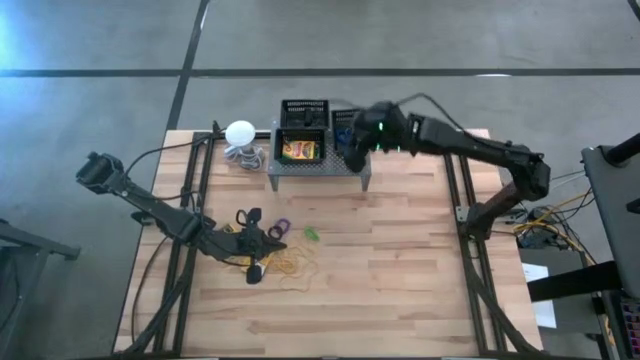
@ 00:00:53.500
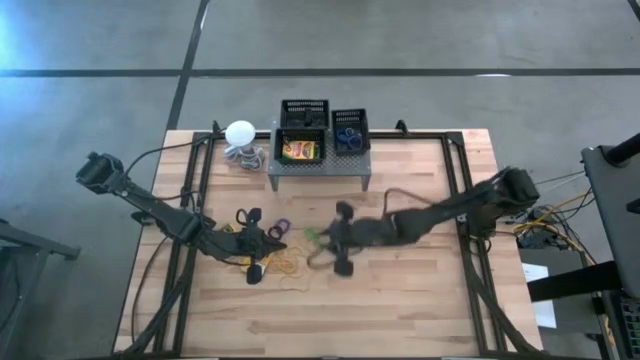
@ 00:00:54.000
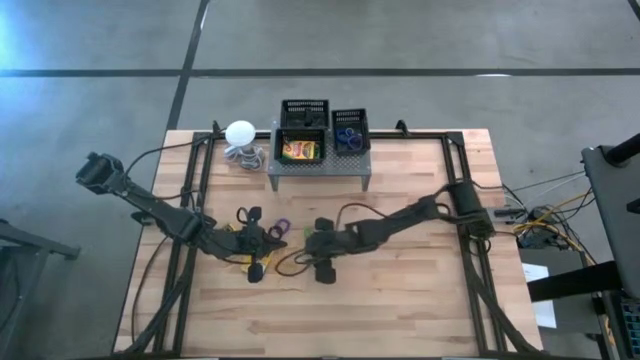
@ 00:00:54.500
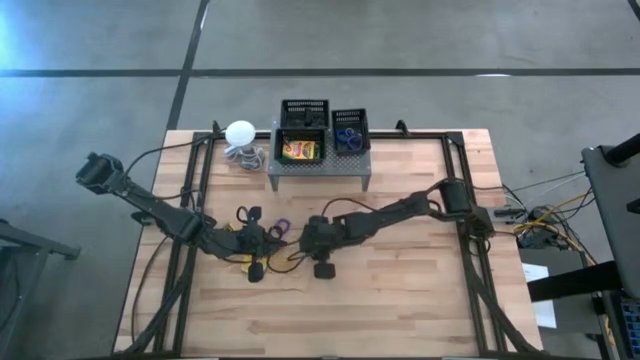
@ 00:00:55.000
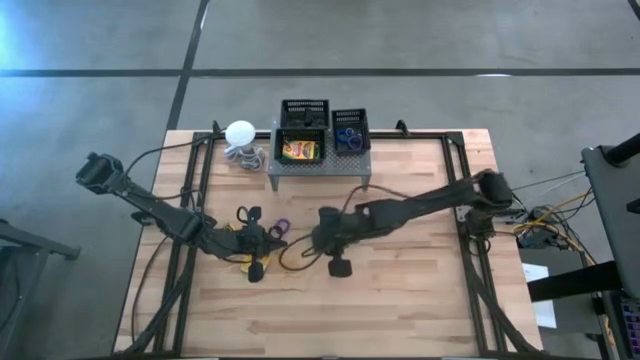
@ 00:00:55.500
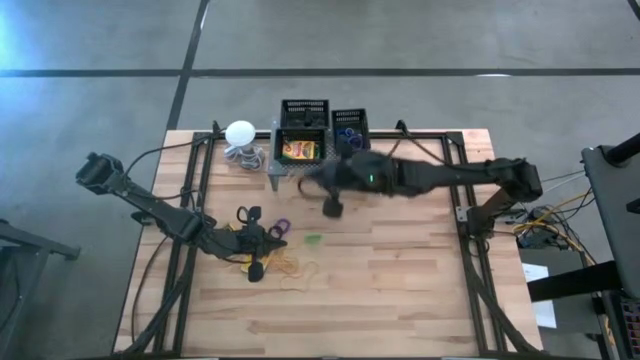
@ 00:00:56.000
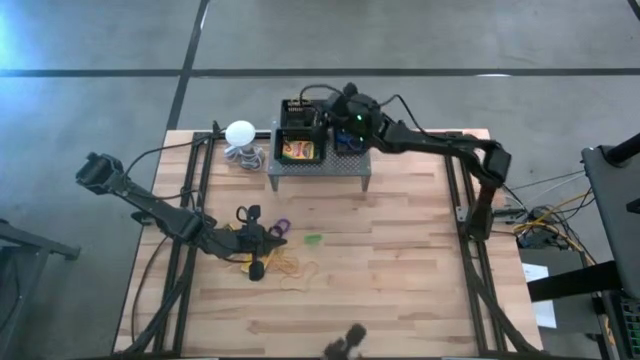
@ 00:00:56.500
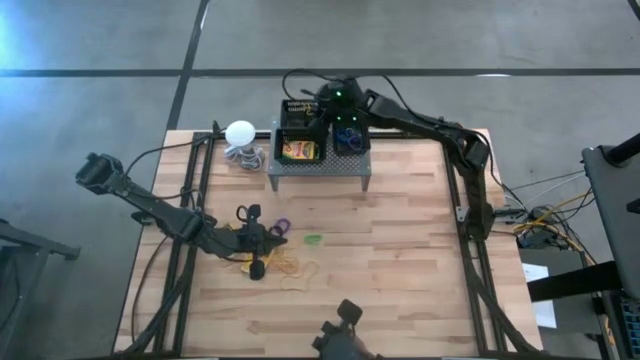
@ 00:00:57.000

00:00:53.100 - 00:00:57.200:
Task: Pick & Place Office Desk Supplies
Put the yellow rubber band into the top left black bin on the shelf

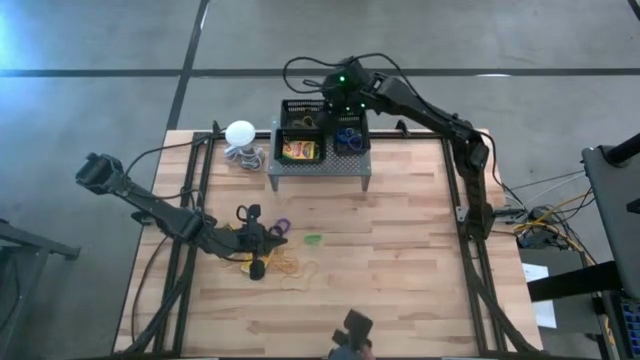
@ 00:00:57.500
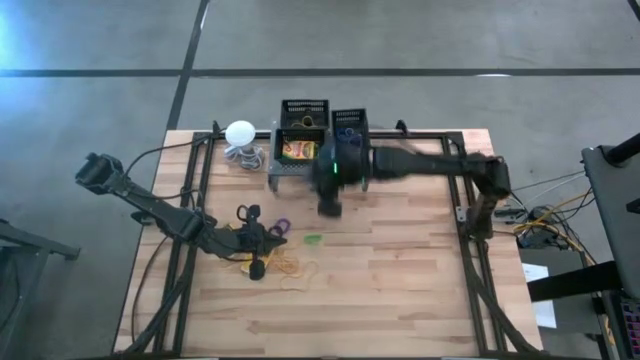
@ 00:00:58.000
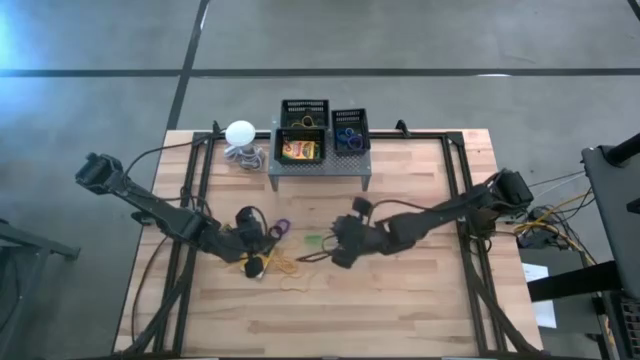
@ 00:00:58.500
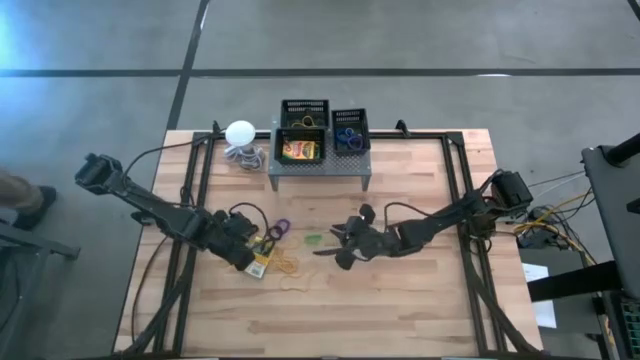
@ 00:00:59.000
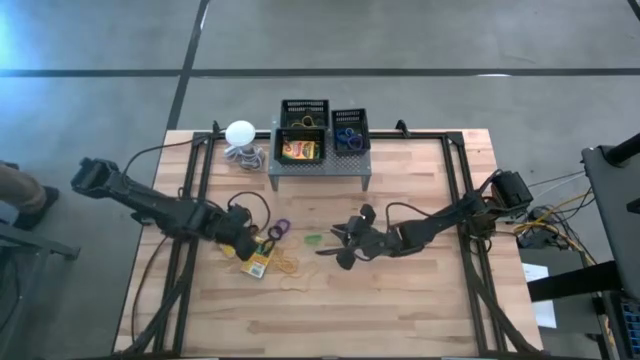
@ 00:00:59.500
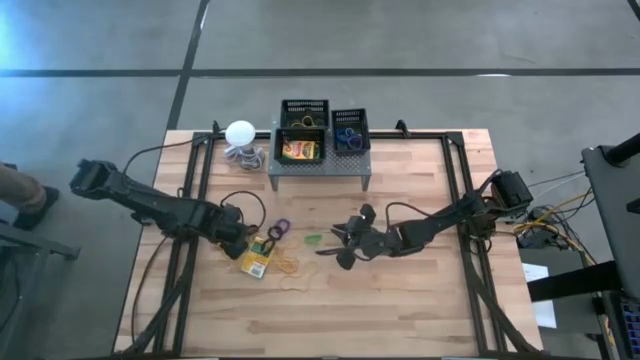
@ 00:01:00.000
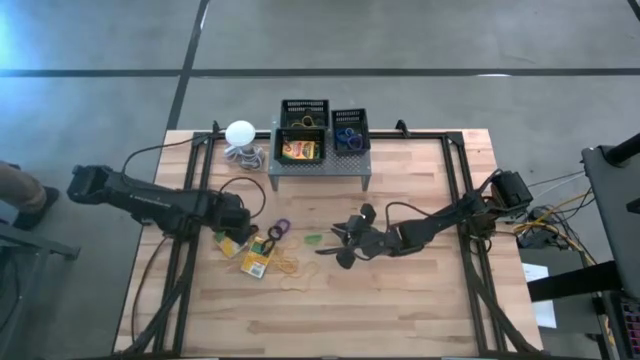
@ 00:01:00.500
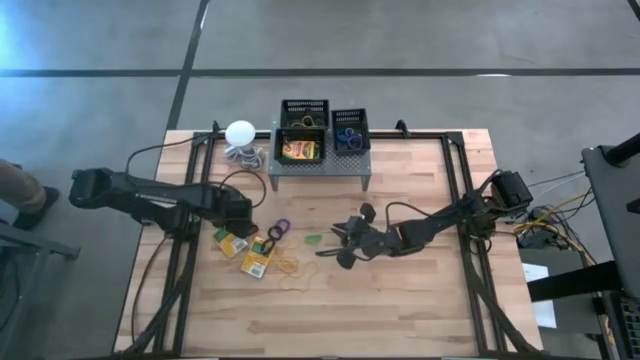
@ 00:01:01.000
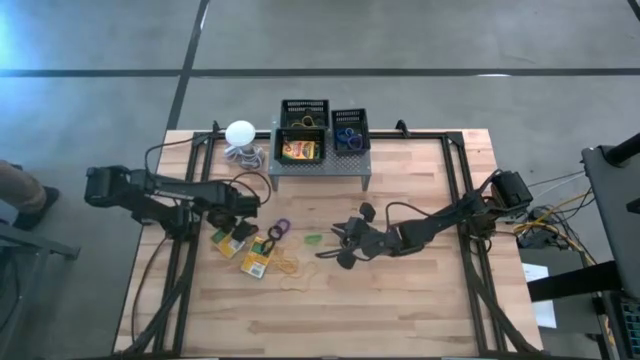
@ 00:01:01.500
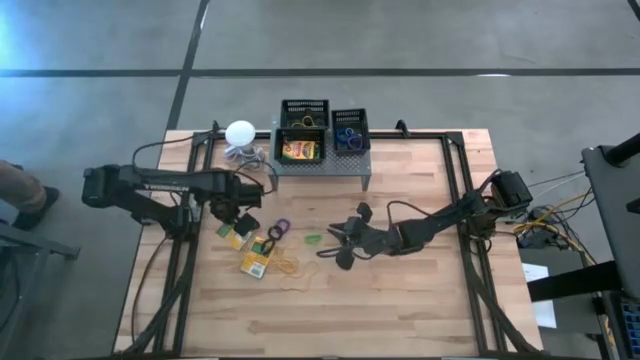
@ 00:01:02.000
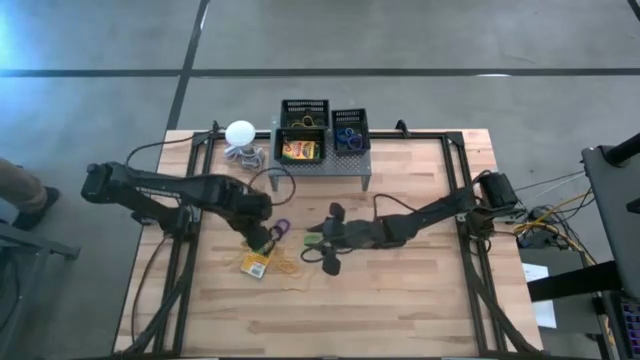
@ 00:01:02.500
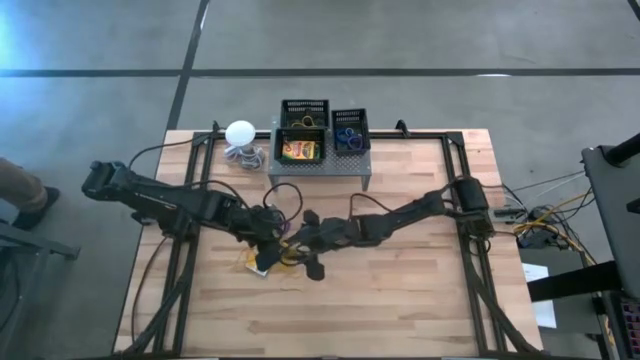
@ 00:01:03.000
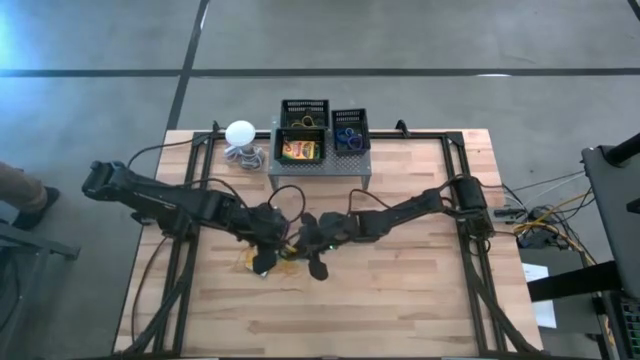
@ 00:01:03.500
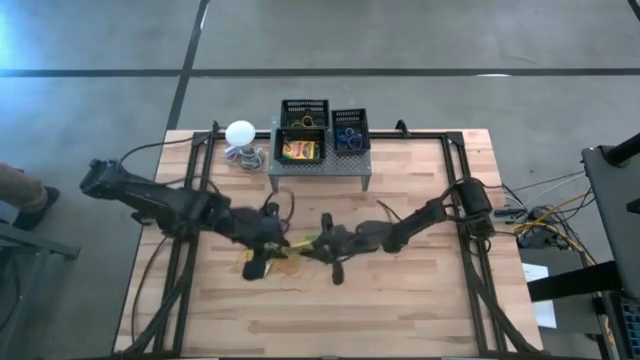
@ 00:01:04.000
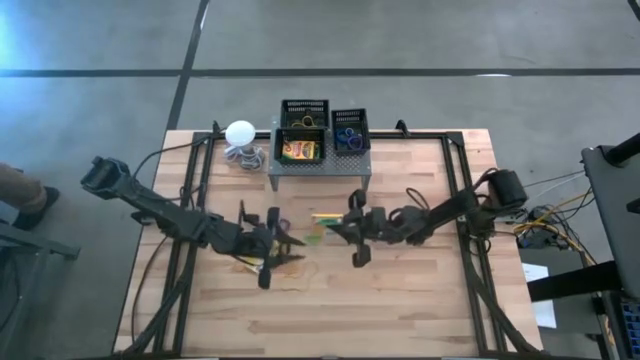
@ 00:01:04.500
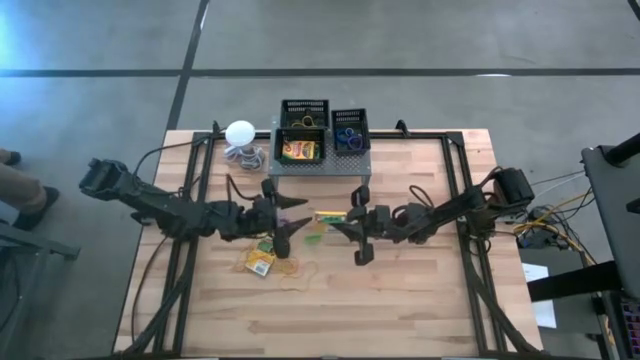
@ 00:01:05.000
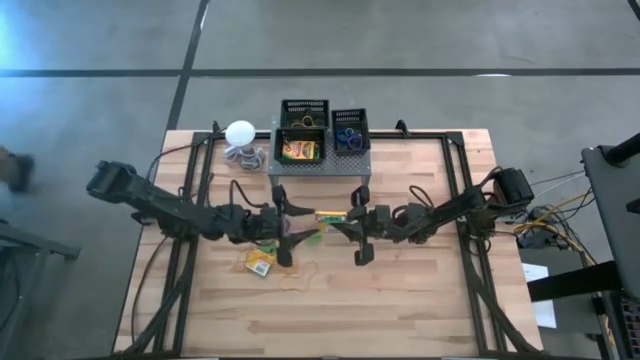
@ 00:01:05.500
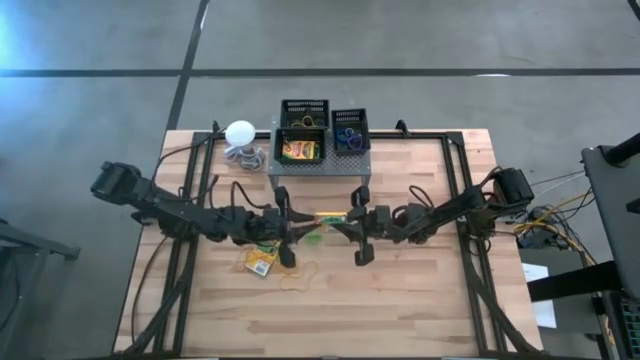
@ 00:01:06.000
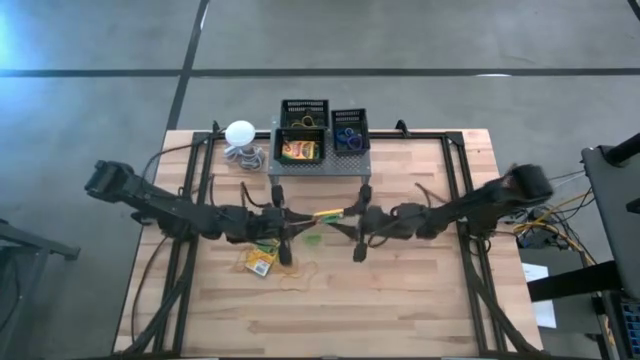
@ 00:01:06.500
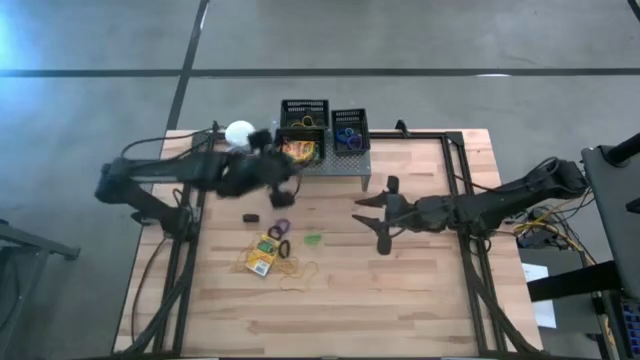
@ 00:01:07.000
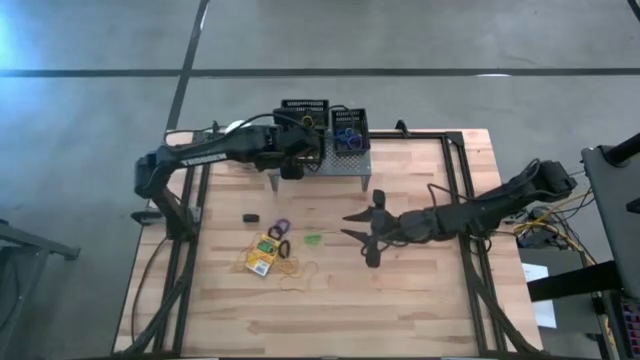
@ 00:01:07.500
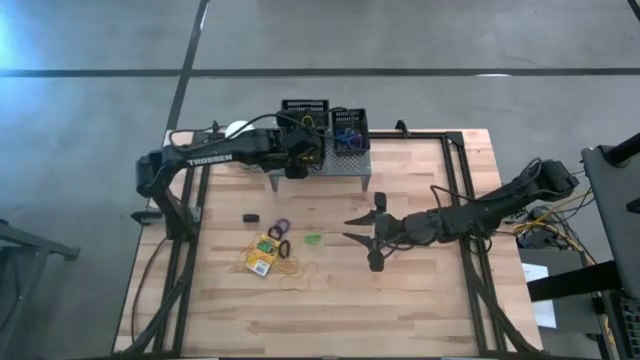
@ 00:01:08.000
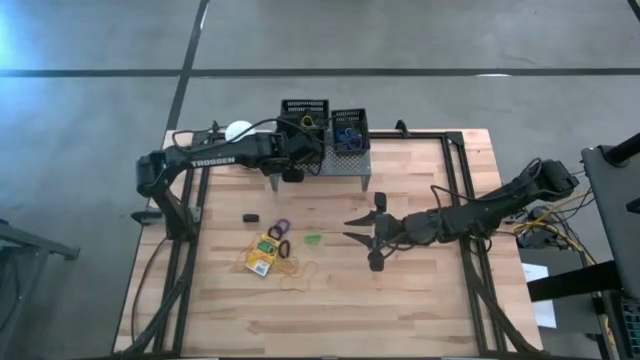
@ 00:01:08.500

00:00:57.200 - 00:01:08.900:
Put the left box of crayons into the bottom left black bin on the shelf

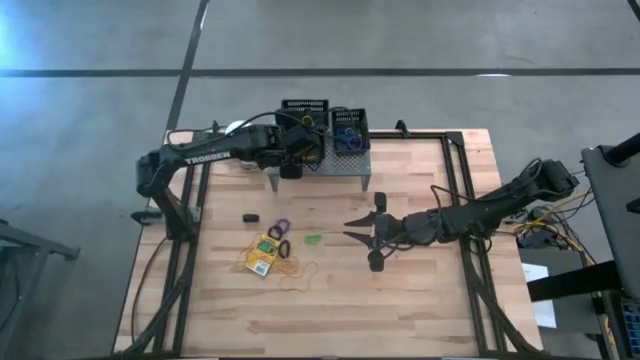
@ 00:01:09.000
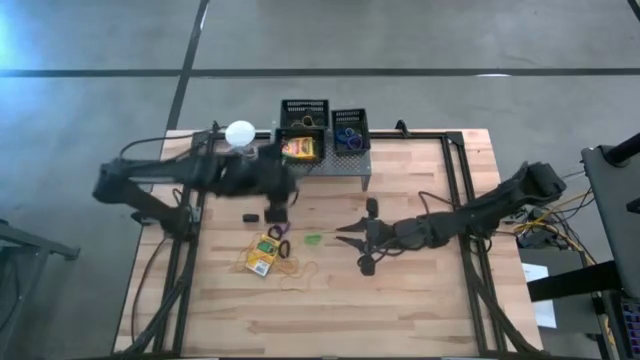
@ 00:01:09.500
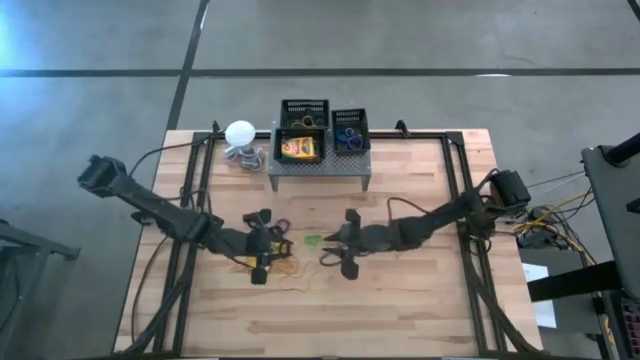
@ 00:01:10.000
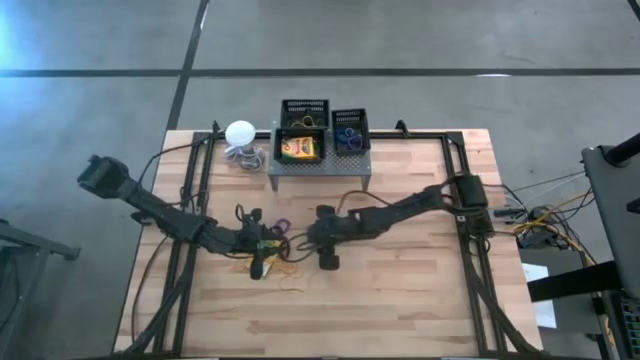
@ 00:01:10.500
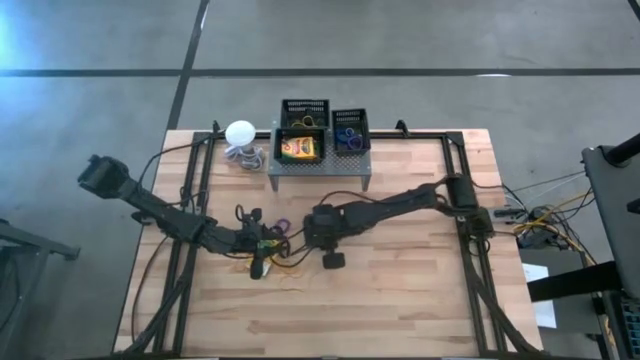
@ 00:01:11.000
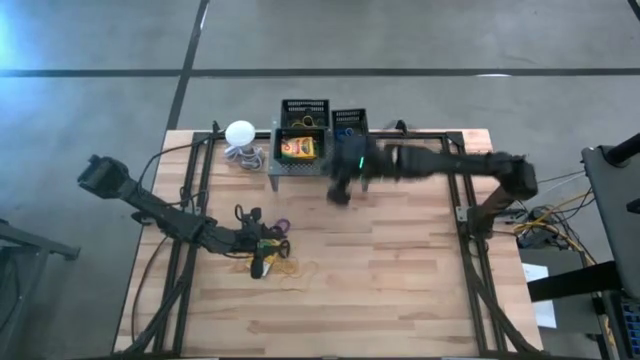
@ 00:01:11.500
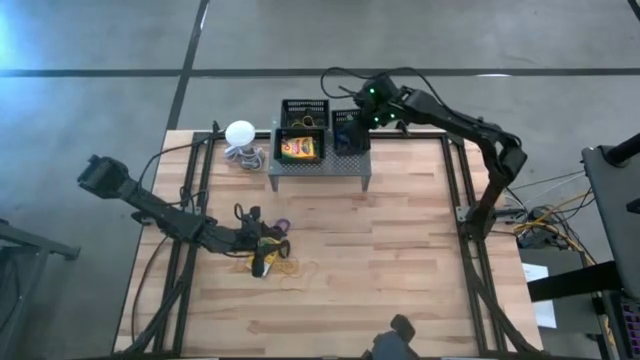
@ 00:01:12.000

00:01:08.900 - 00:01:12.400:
Put the green spring keychain into the right black bin on the shelf

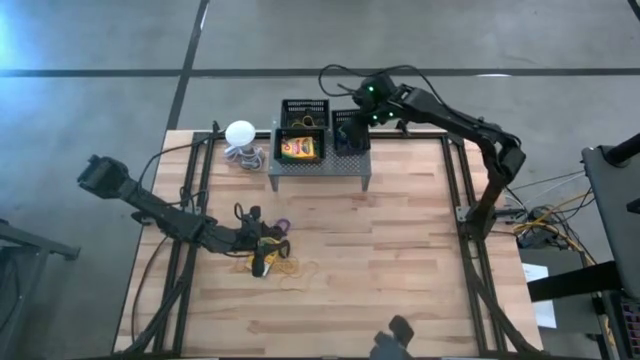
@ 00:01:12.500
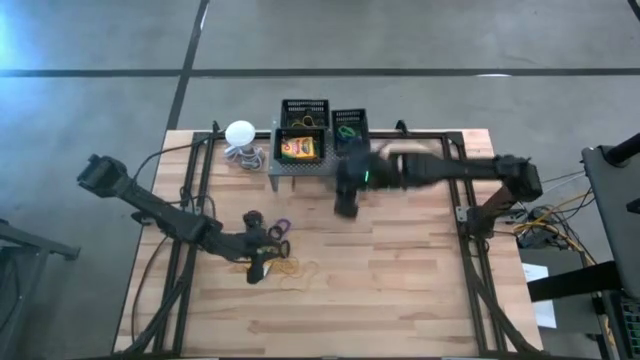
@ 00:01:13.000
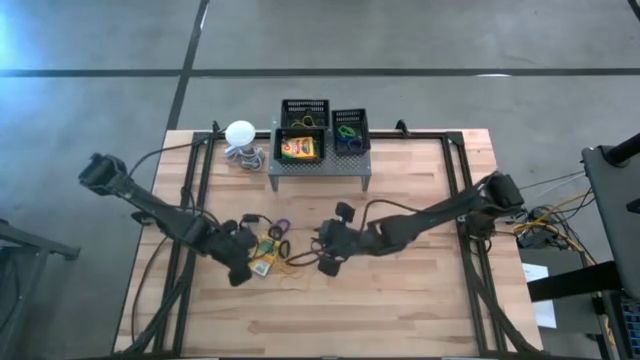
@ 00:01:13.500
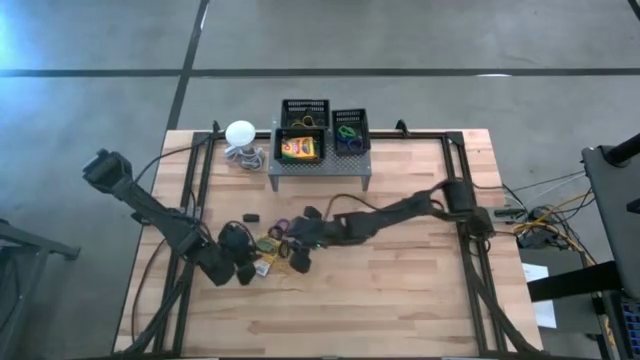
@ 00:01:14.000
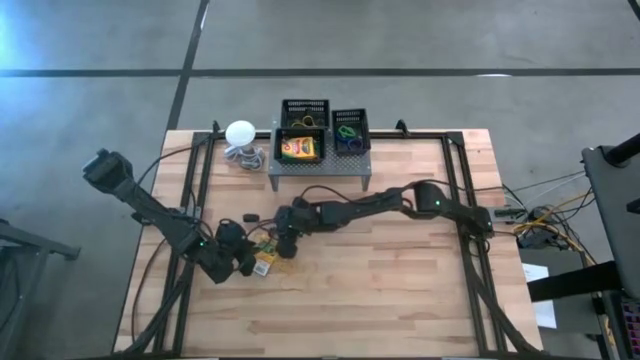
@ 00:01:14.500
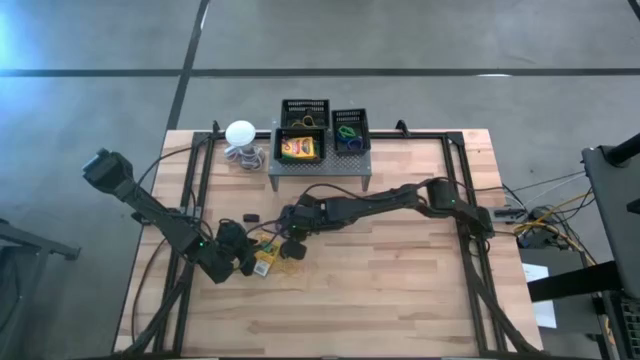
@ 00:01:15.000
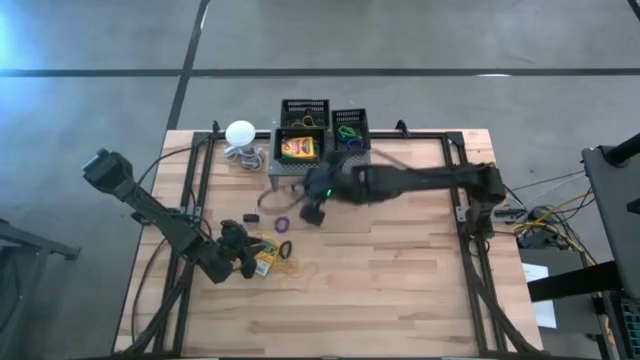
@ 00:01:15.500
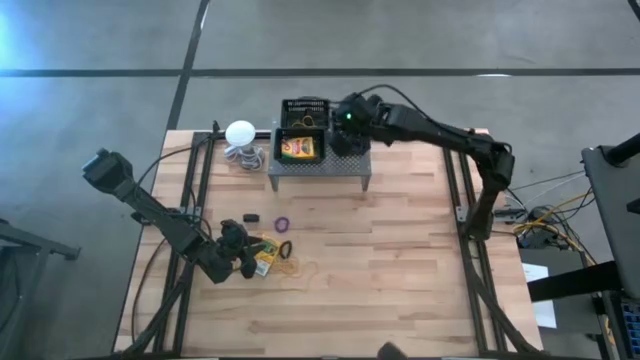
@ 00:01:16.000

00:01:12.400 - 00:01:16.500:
Put the top black spring keychain into the right black bin on the shelf
